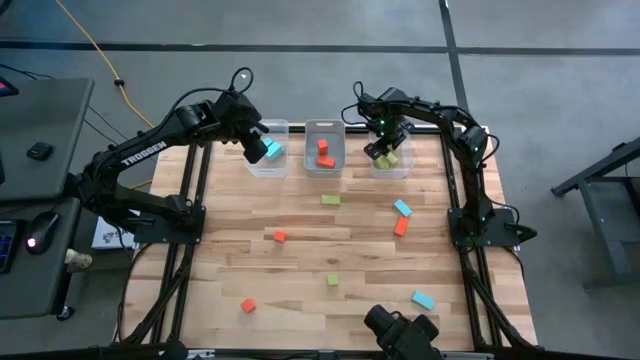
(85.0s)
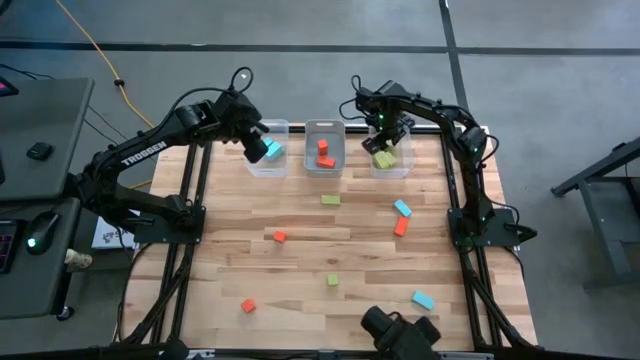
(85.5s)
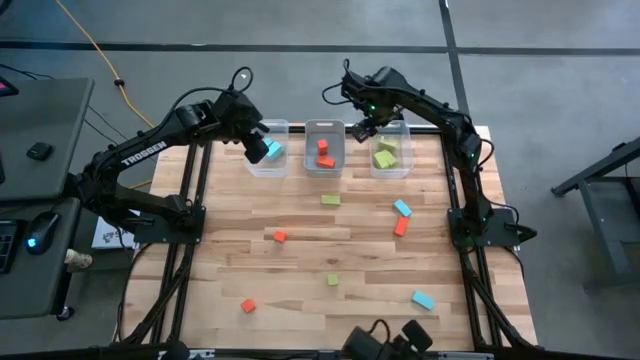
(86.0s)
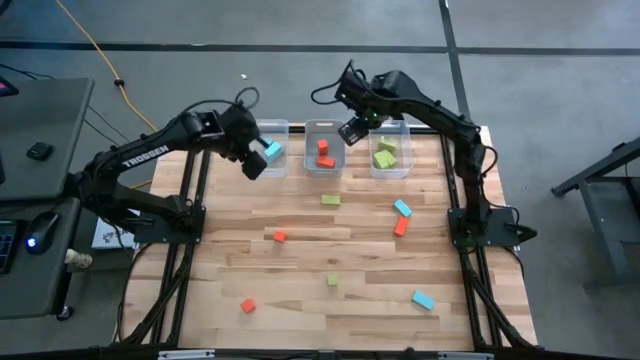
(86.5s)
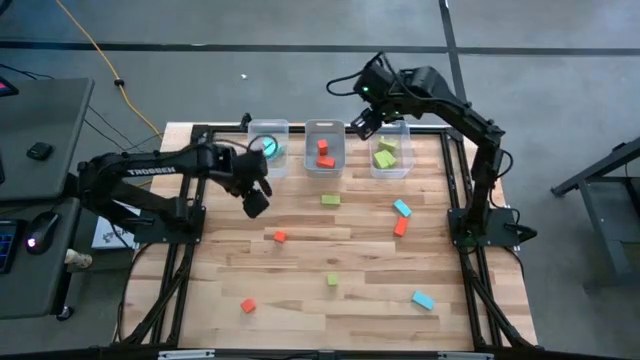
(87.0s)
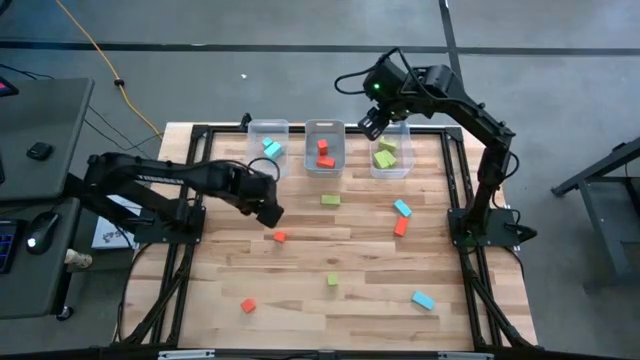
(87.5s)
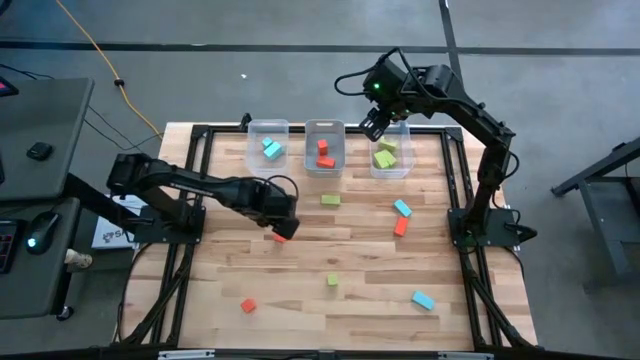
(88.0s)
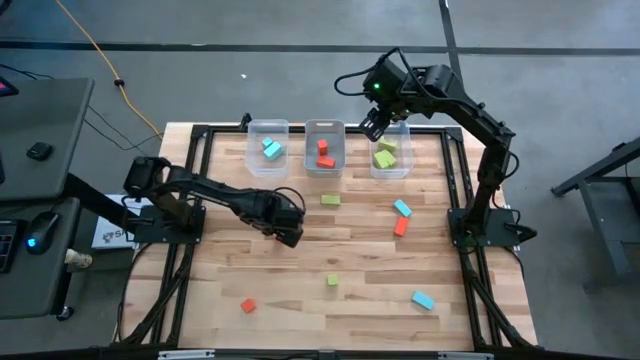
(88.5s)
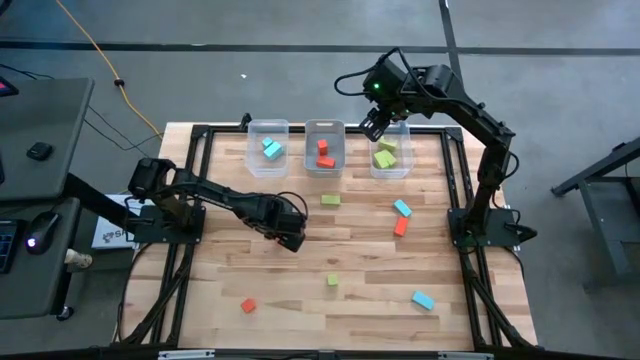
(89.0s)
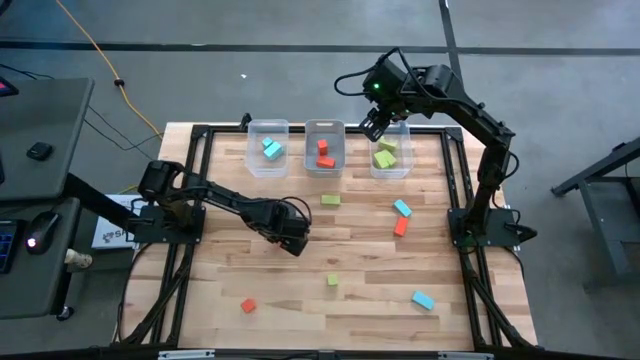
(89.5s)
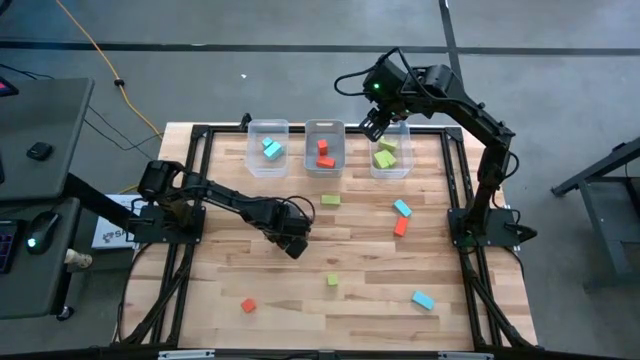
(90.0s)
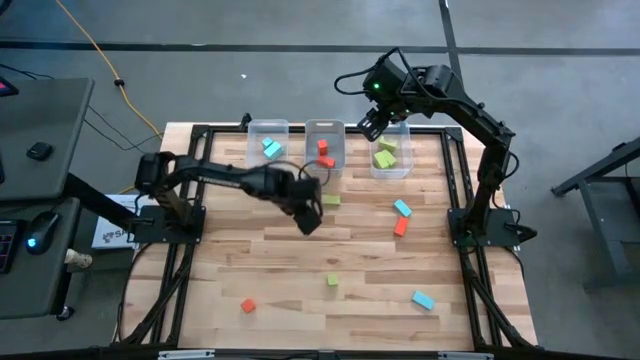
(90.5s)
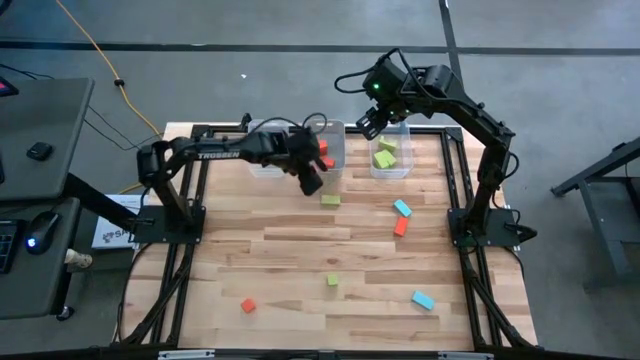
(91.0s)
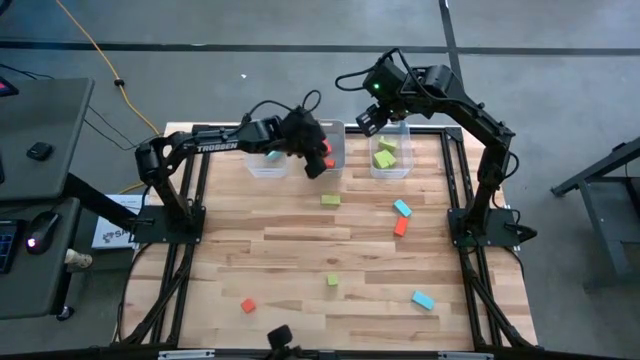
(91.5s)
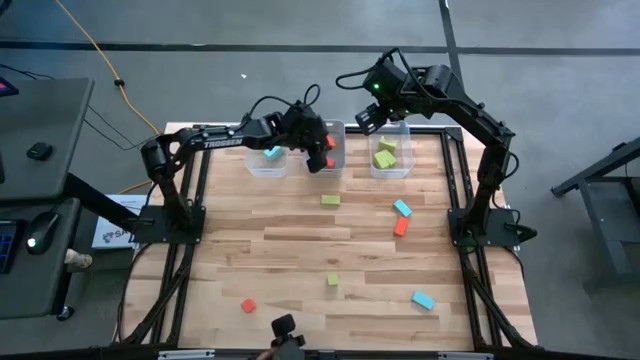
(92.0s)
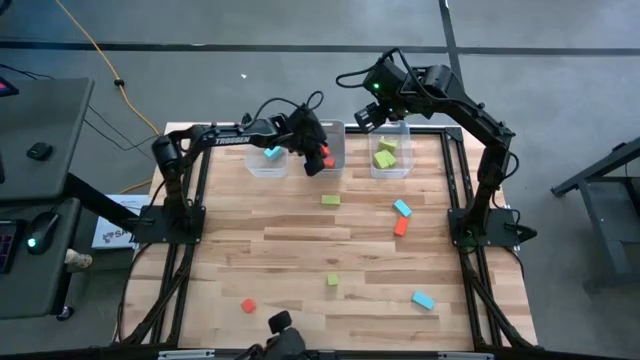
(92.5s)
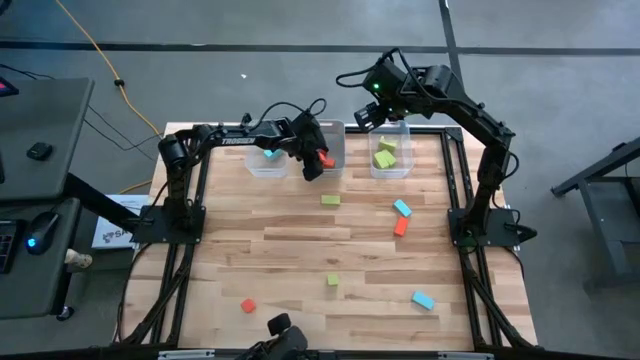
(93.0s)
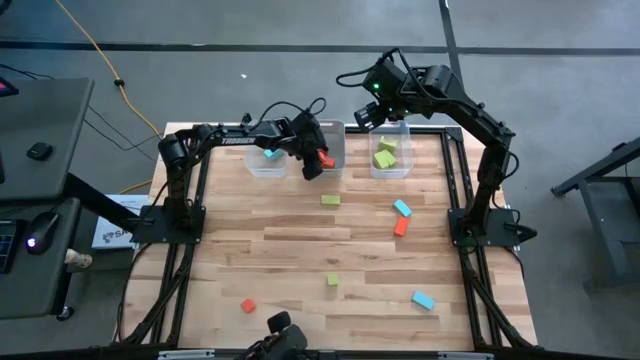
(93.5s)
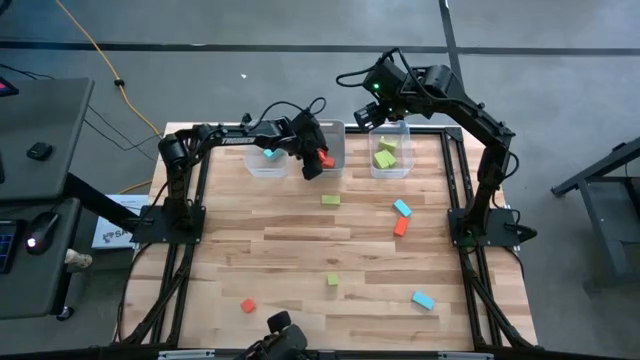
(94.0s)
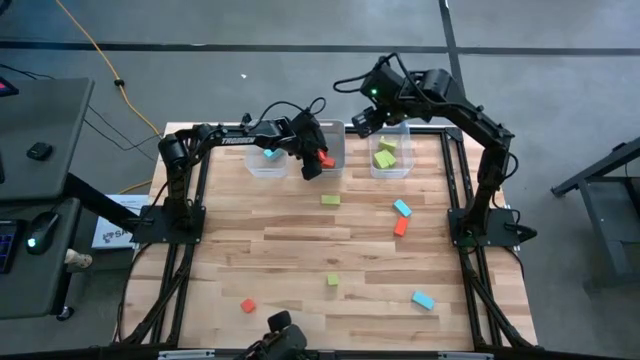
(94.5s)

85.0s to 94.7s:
Task: Sort & place blocks by color
Put the orange cube into the gray bin

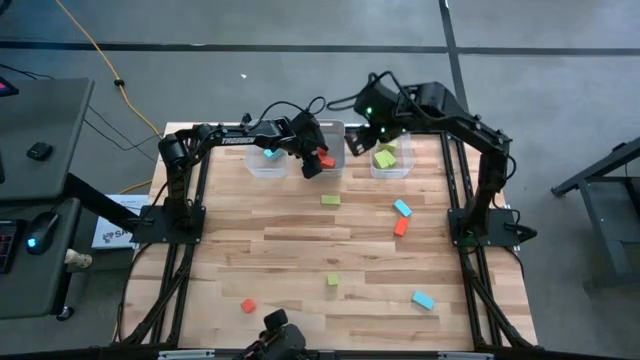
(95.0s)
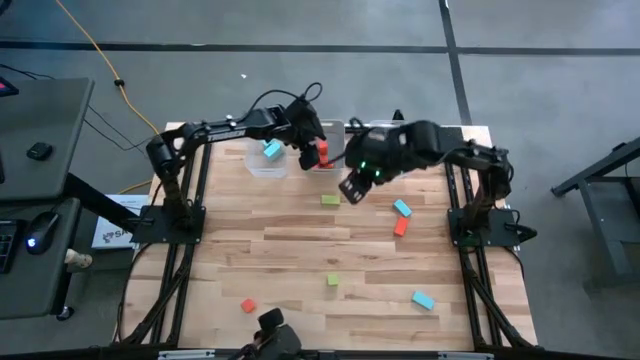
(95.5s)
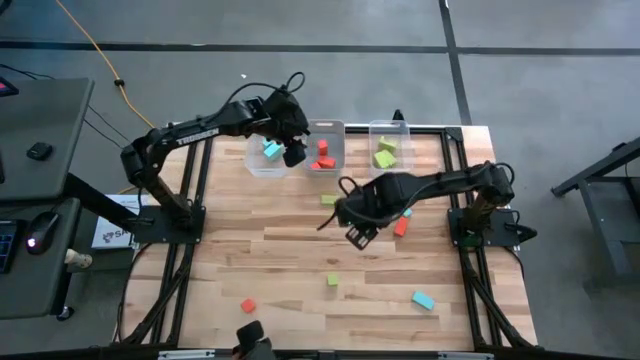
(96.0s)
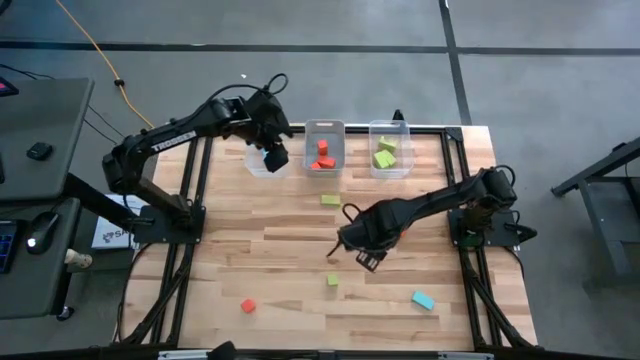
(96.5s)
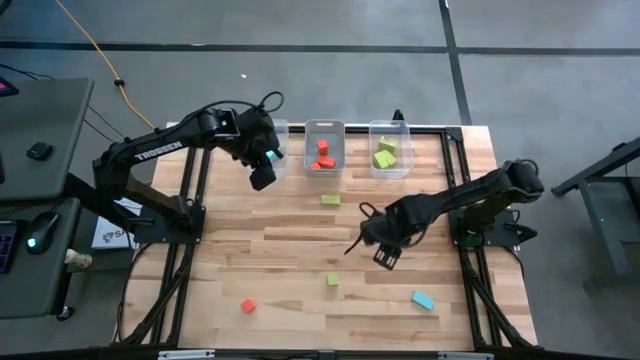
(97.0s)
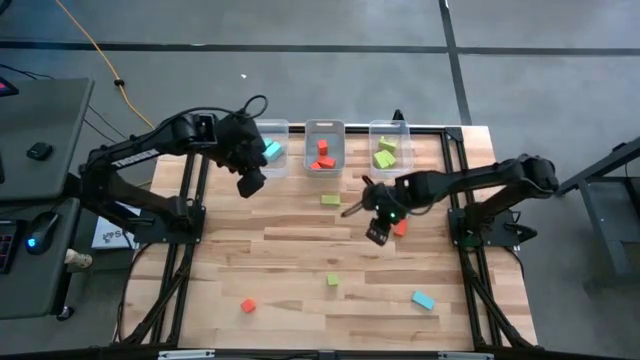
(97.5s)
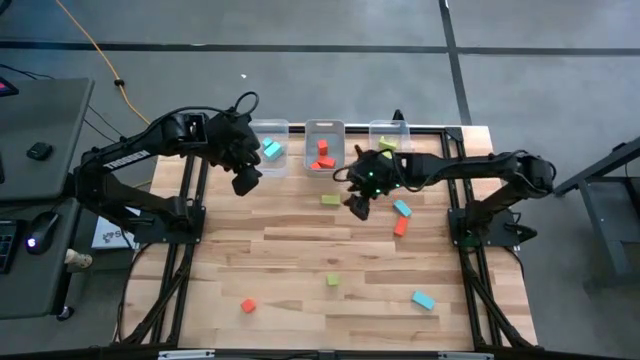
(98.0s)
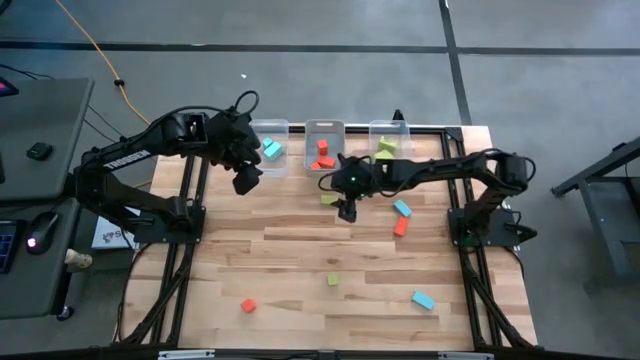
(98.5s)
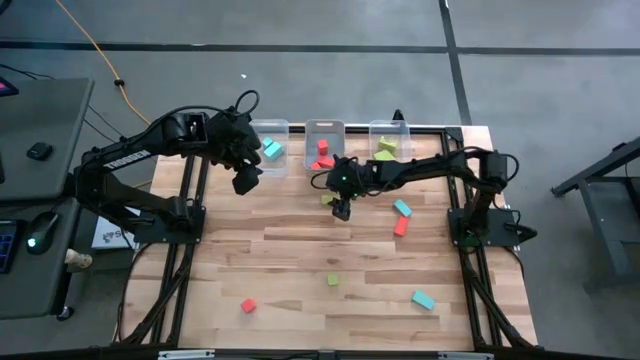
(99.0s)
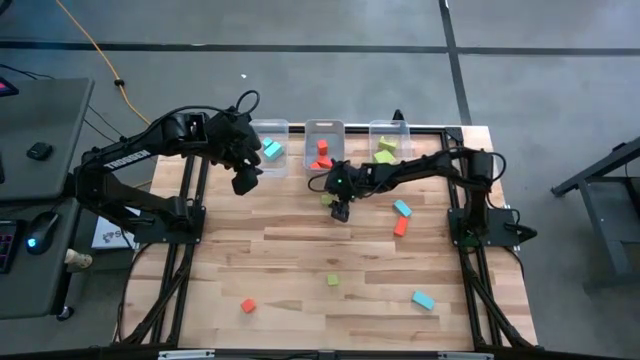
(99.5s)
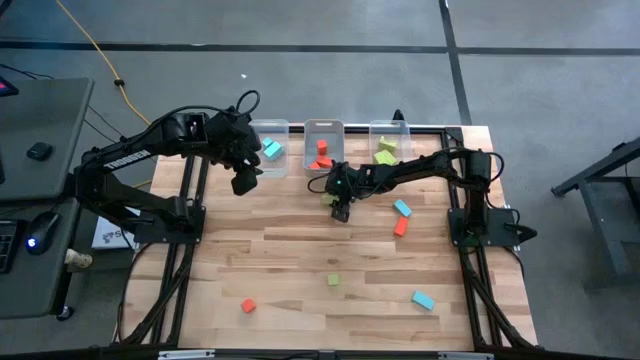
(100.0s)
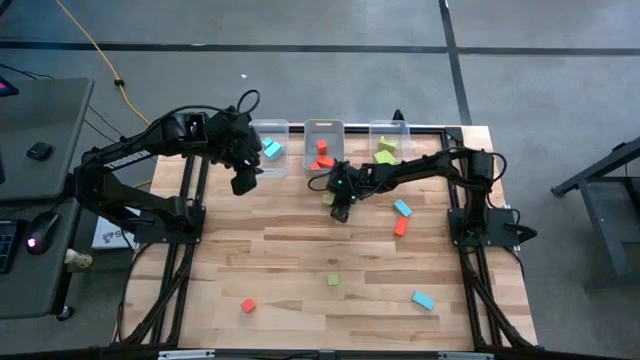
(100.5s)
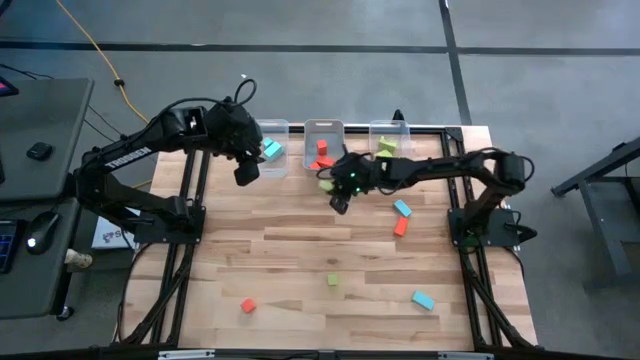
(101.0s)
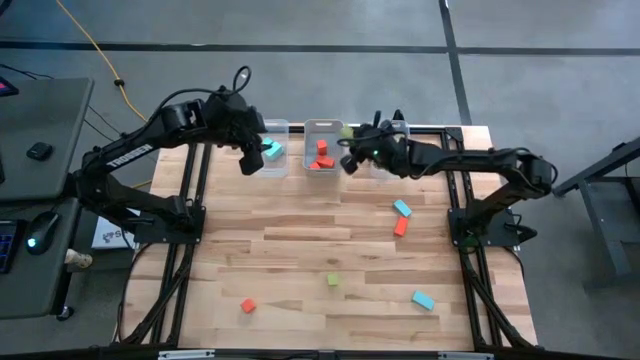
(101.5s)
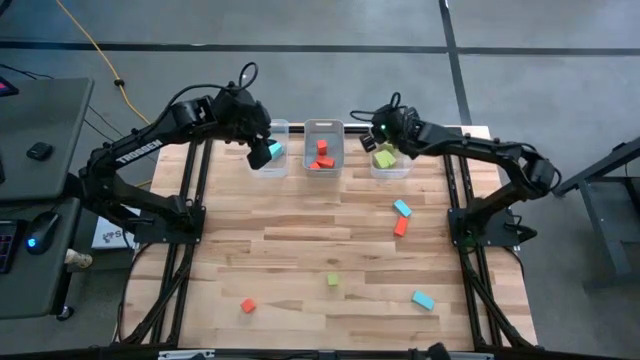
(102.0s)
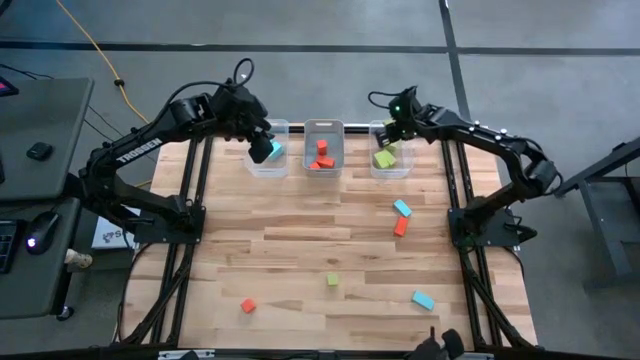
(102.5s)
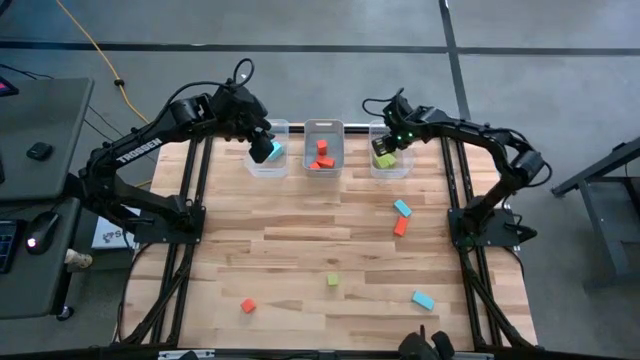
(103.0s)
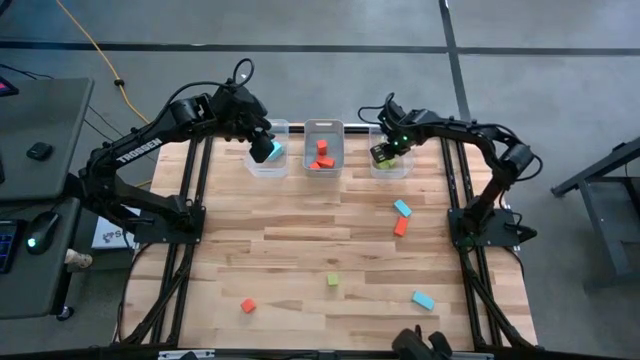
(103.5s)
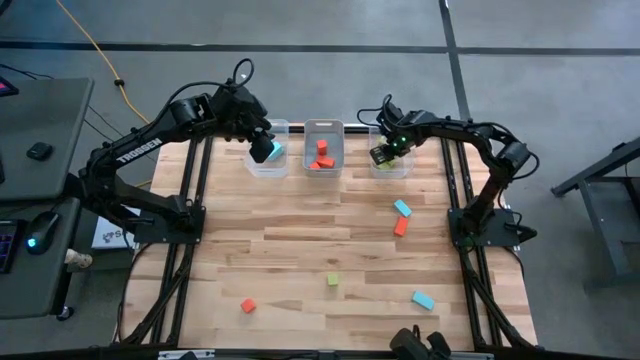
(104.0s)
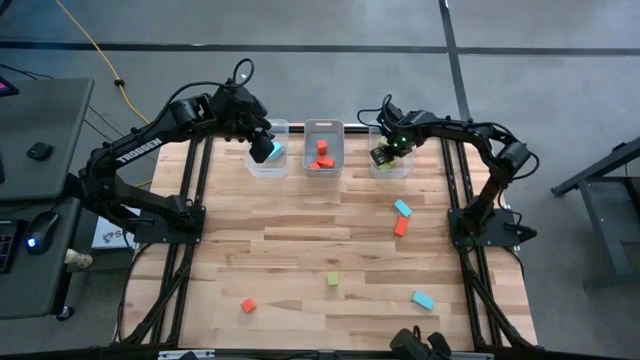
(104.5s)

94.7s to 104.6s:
Put the small green rectangular block into the right transparent bin

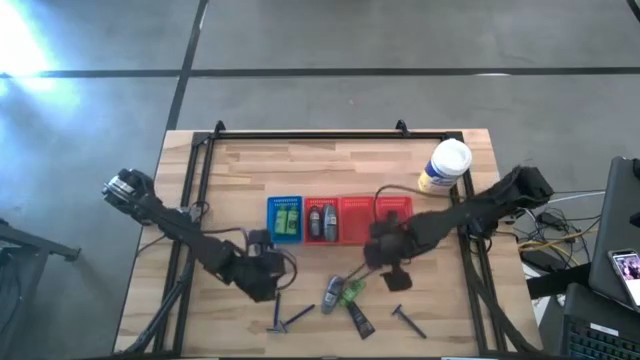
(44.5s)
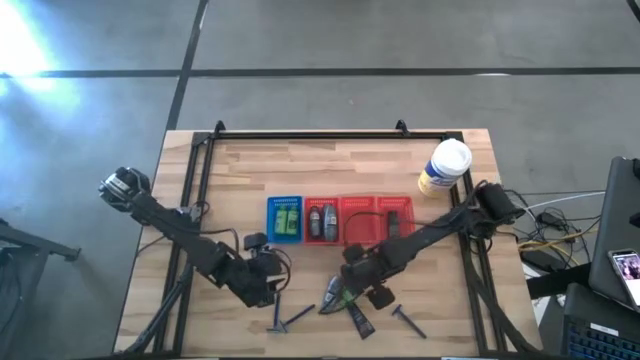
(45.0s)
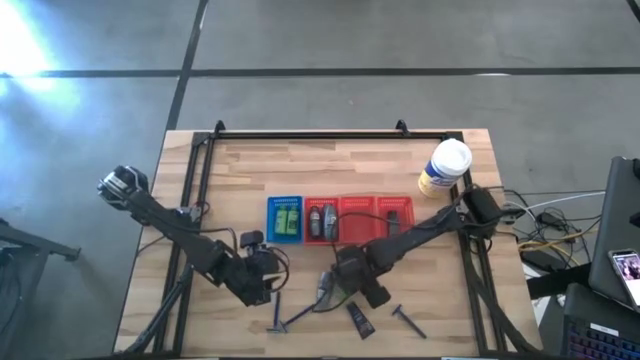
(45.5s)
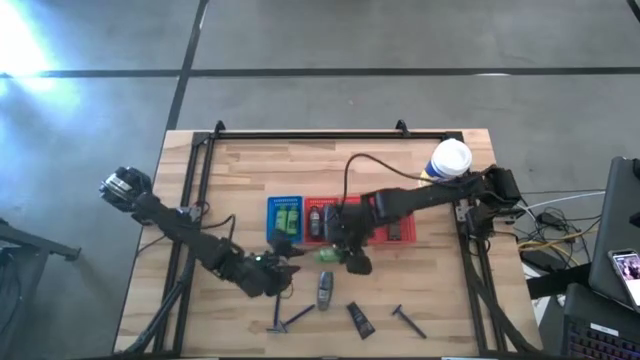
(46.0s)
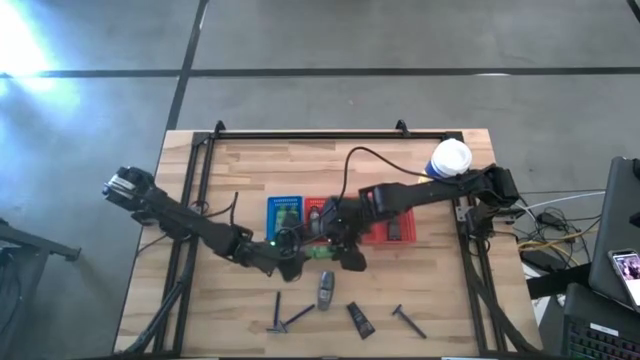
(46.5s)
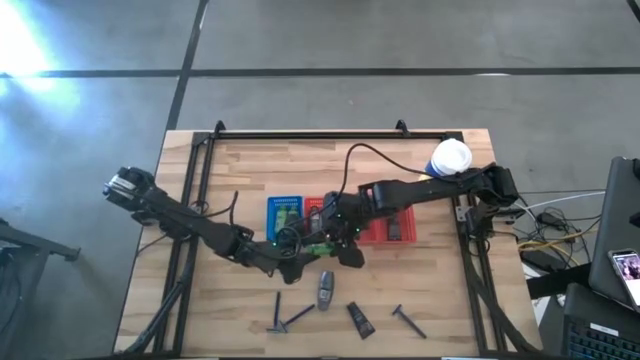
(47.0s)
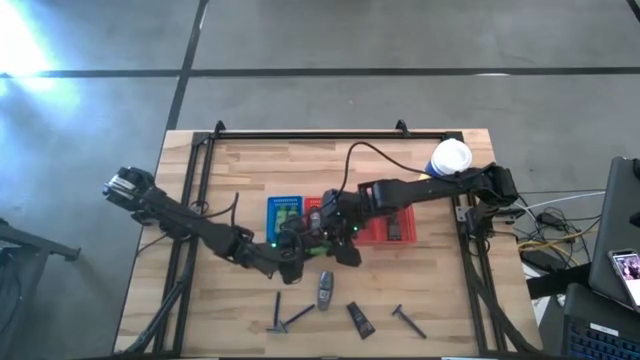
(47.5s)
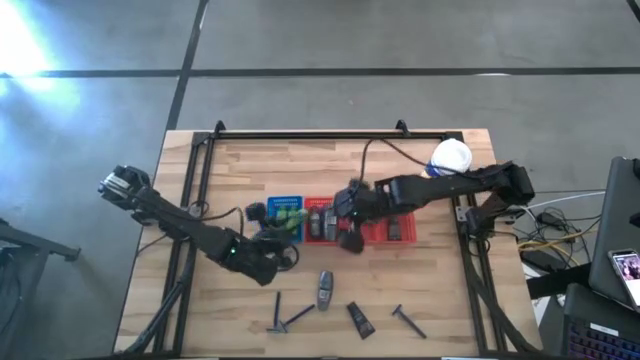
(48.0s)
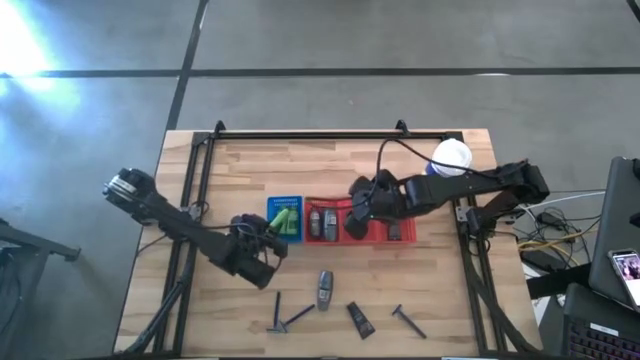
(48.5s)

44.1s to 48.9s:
Task: Pick & Place Travel size toiletries
Put the green shampoo into the blue bin
